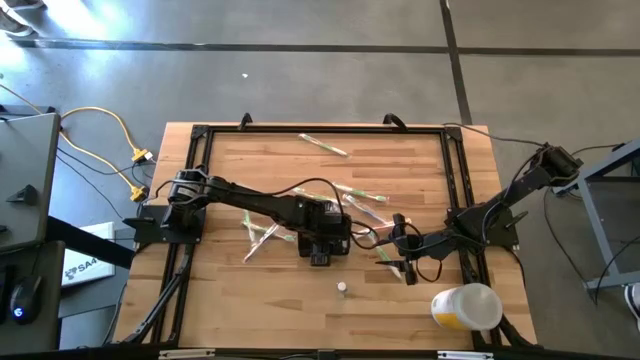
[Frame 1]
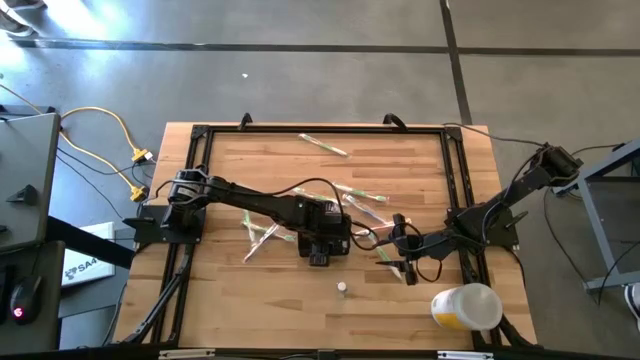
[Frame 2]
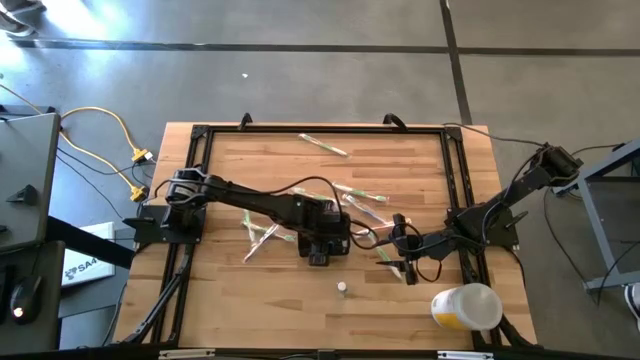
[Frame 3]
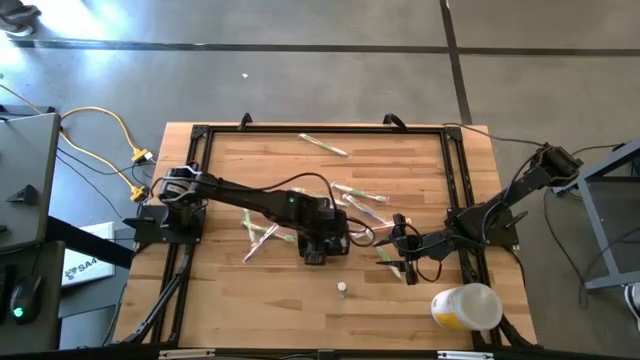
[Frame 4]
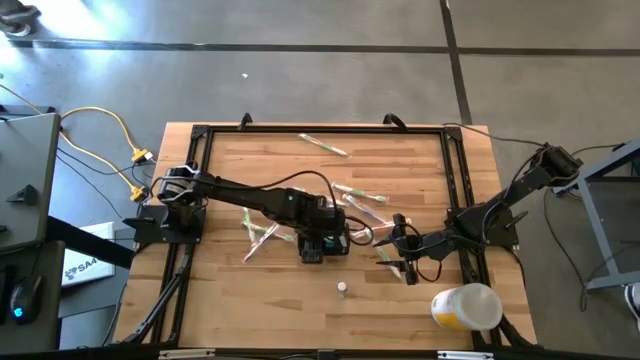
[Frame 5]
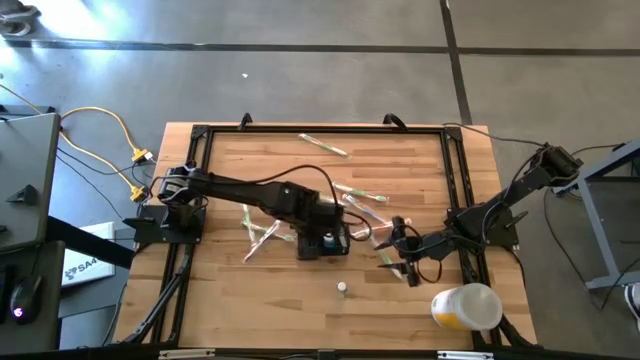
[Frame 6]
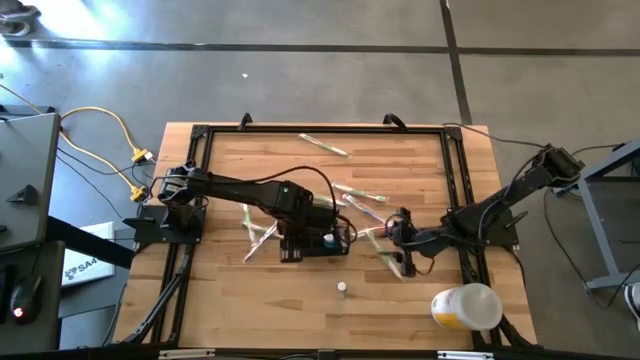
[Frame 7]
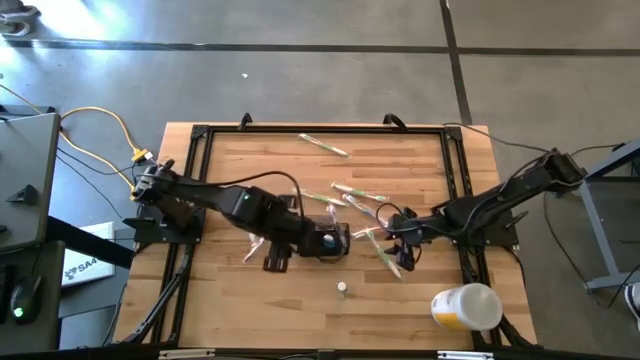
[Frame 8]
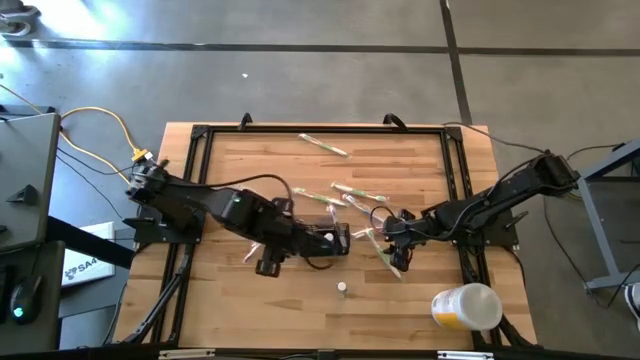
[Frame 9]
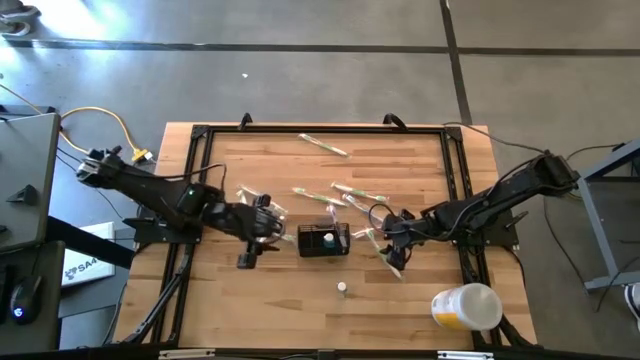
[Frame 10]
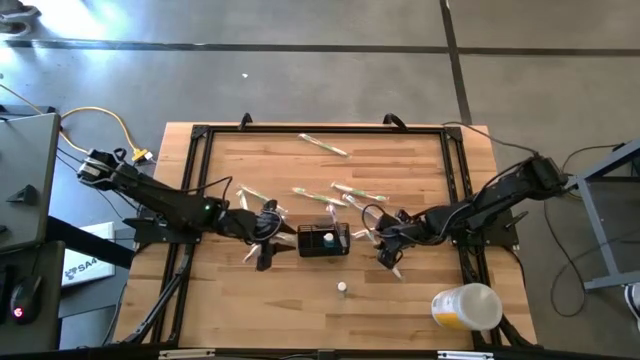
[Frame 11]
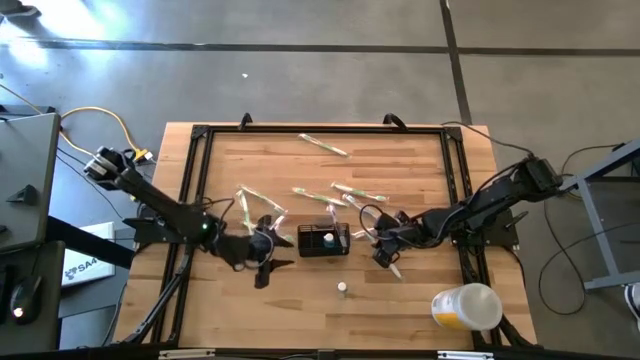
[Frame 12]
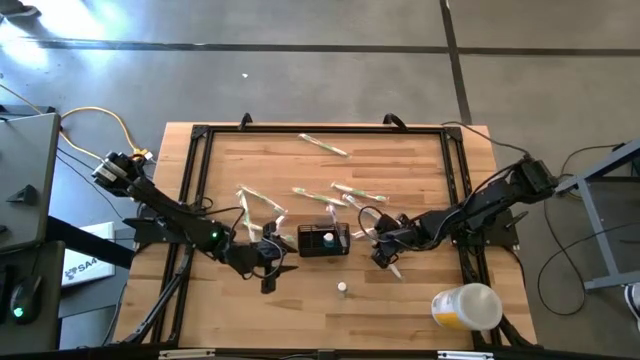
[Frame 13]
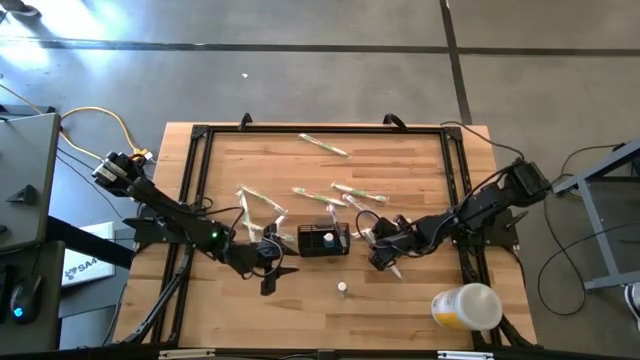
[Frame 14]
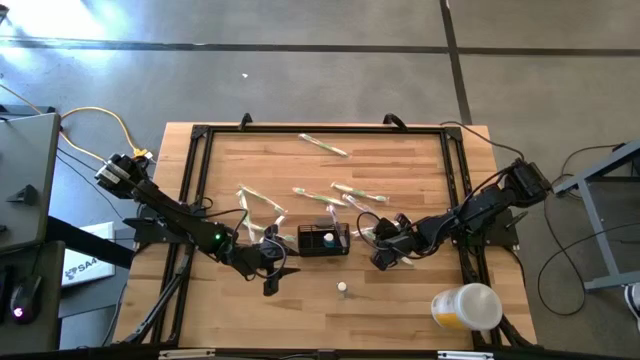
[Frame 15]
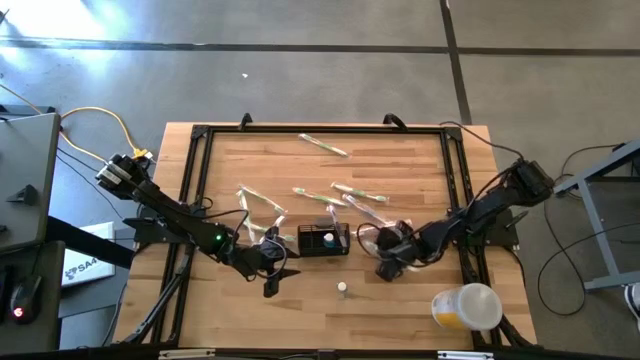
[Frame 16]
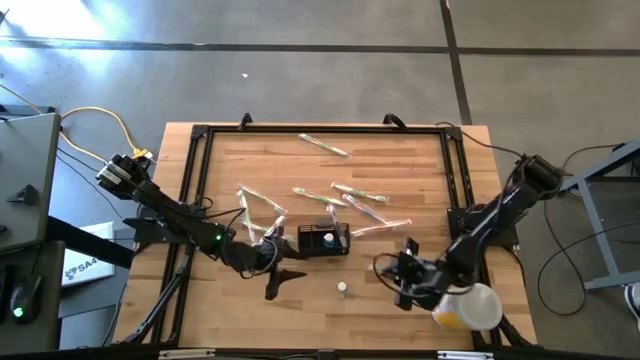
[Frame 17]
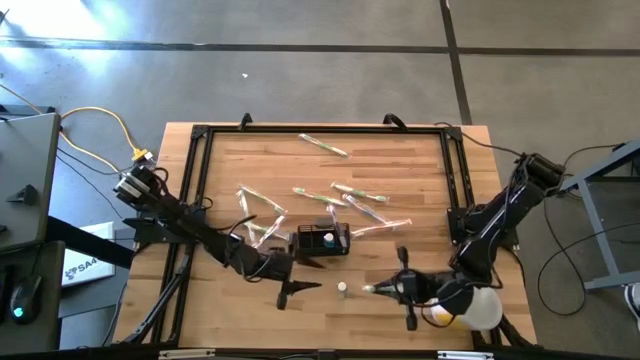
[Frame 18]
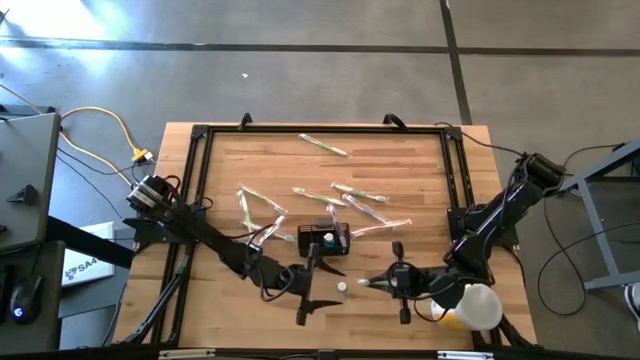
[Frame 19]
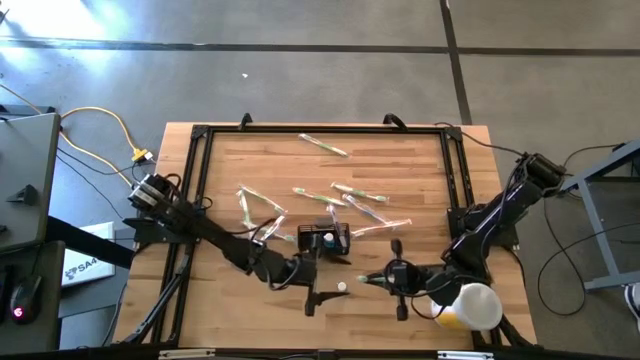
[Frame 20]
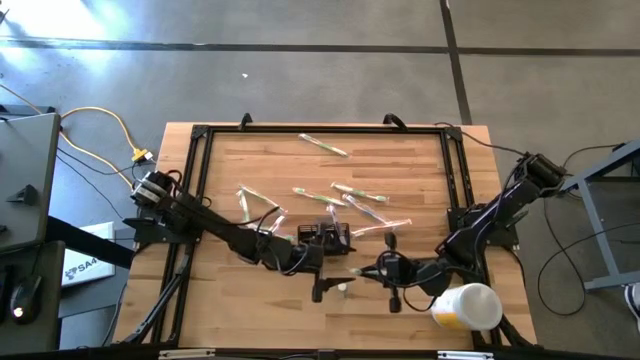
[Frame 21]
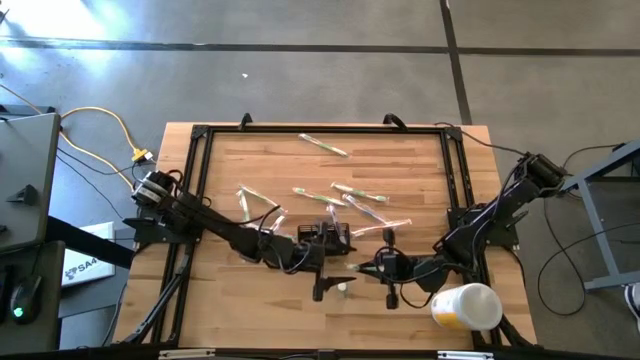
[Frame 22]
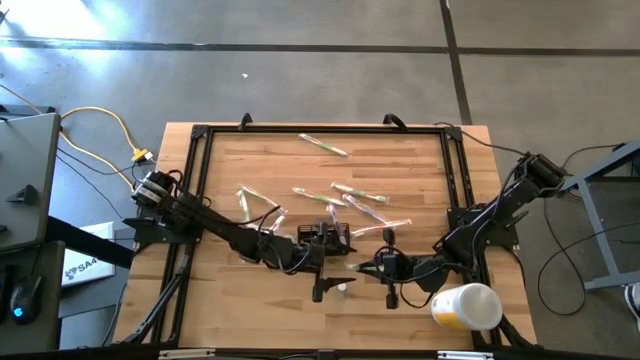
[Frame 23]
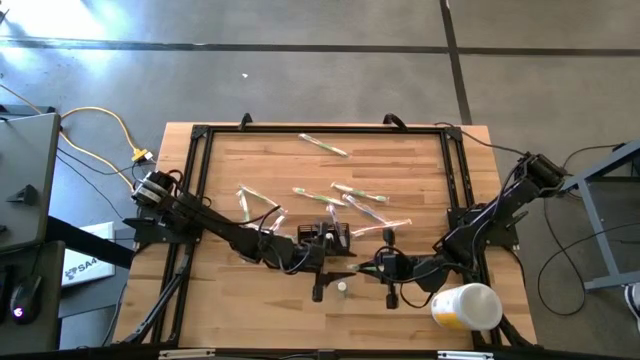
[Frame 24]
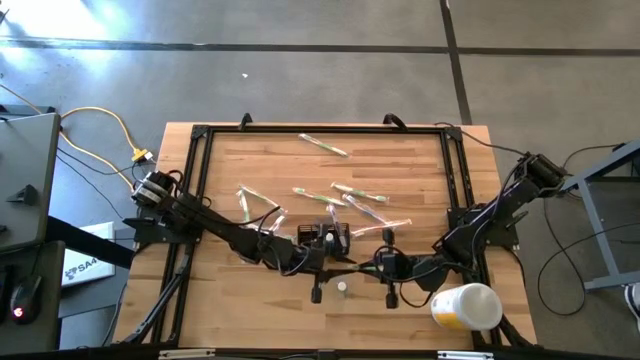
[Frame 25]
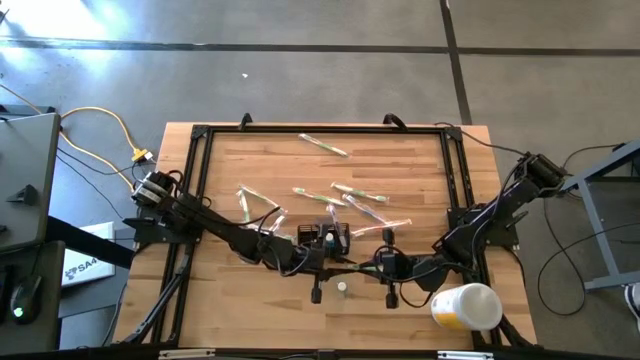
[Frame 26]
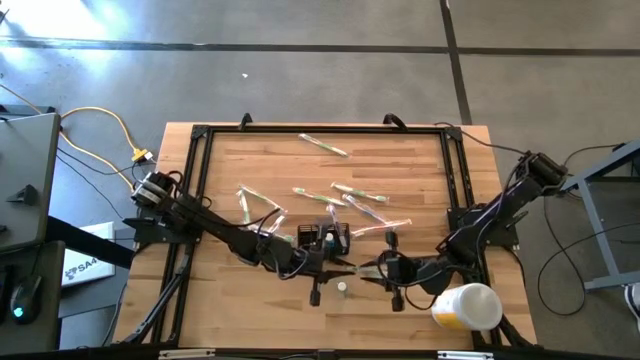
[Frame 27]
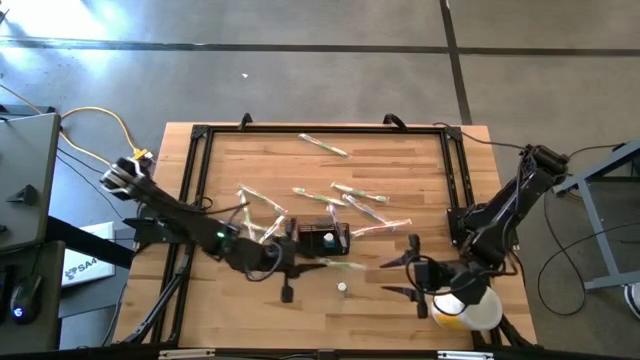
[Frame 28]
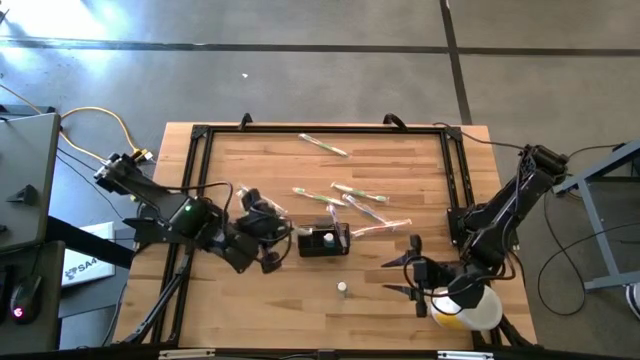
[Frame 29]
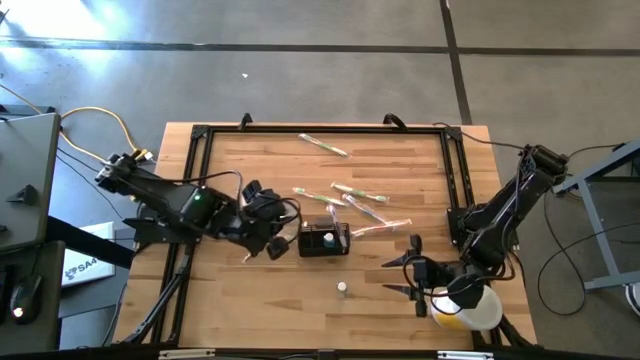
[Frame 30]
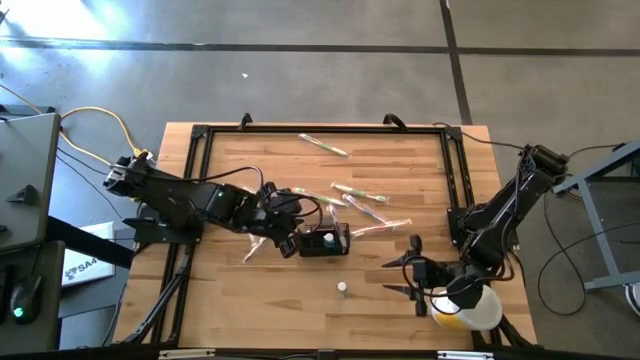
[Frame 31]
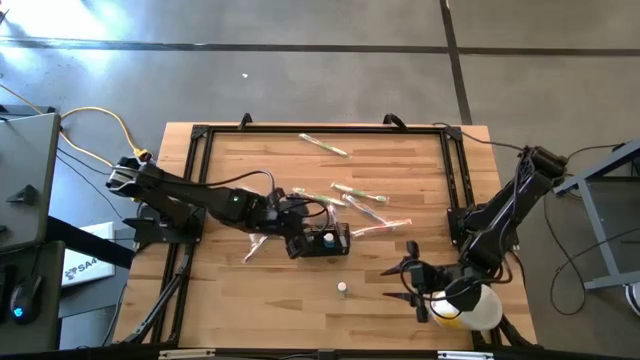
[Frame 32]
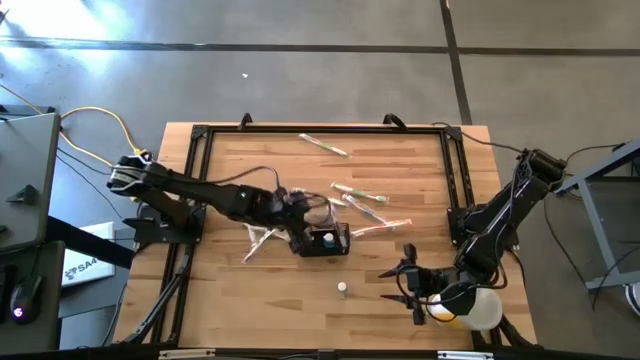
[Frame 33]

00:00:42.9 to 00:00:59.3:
Task: Pick & Place toothbrushing station
Put the green toothbrush into the wire organizer

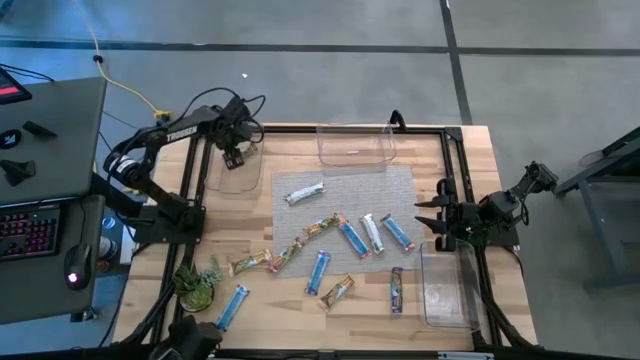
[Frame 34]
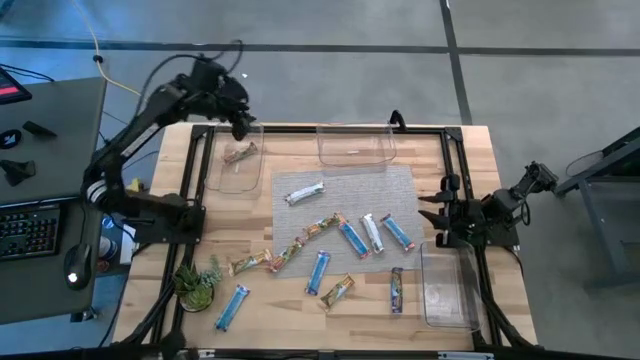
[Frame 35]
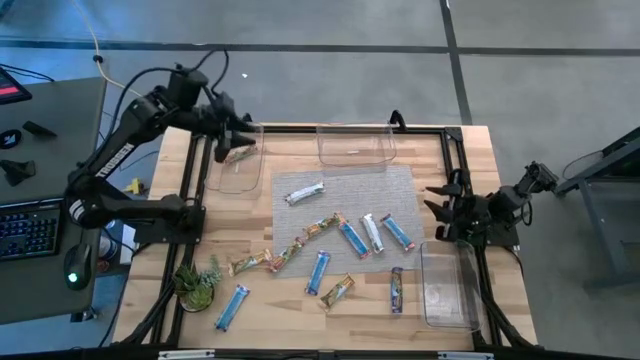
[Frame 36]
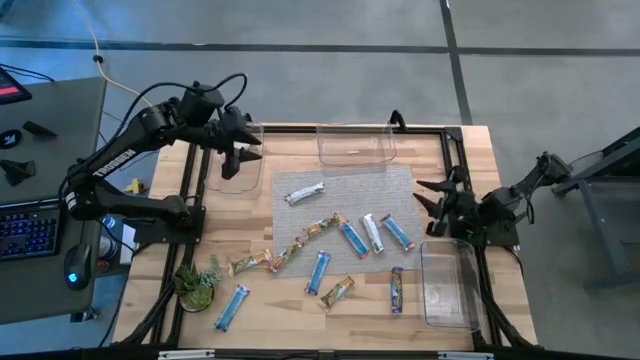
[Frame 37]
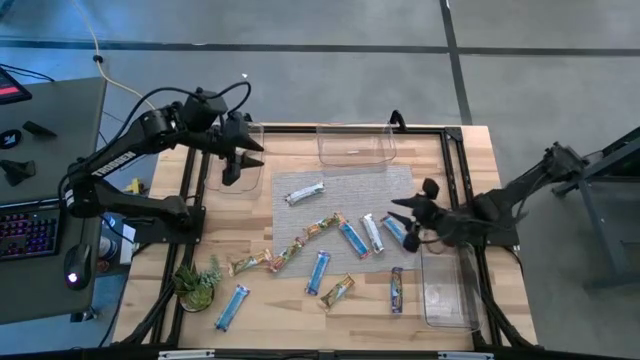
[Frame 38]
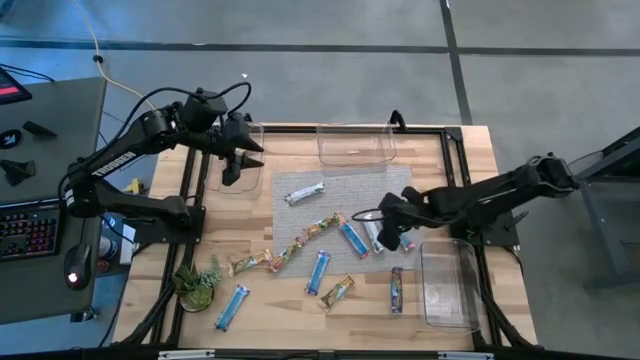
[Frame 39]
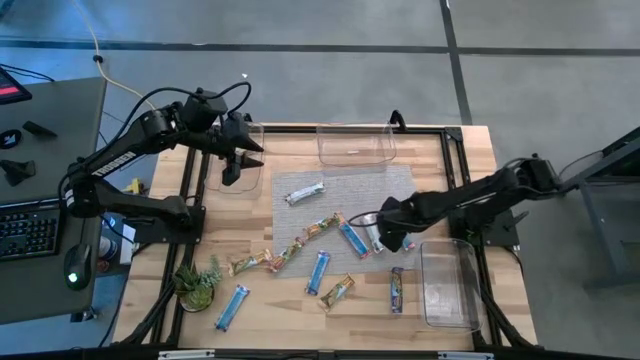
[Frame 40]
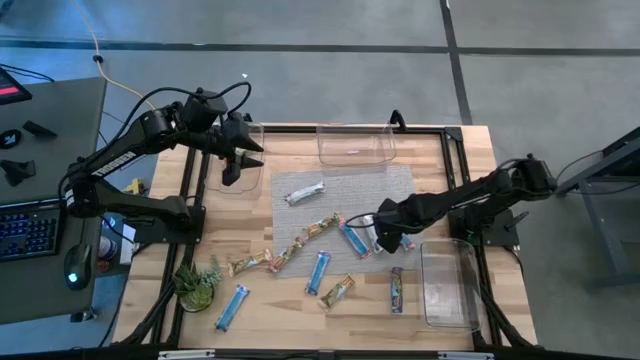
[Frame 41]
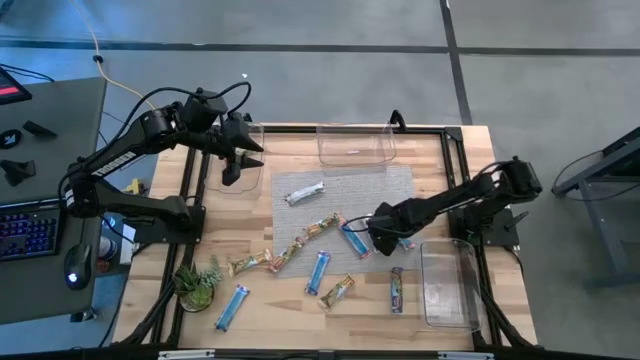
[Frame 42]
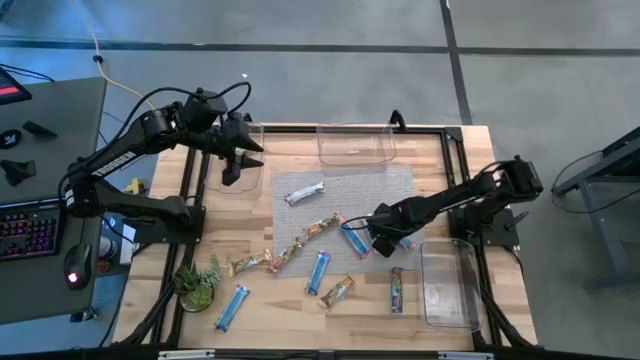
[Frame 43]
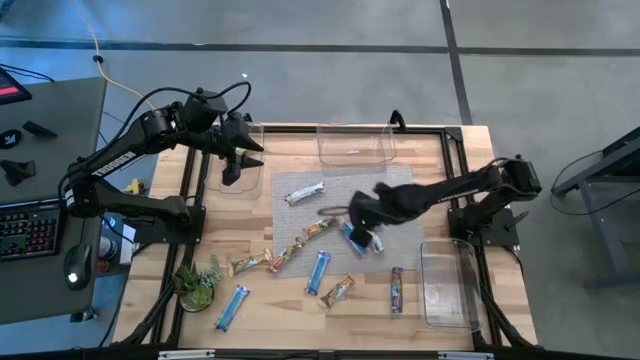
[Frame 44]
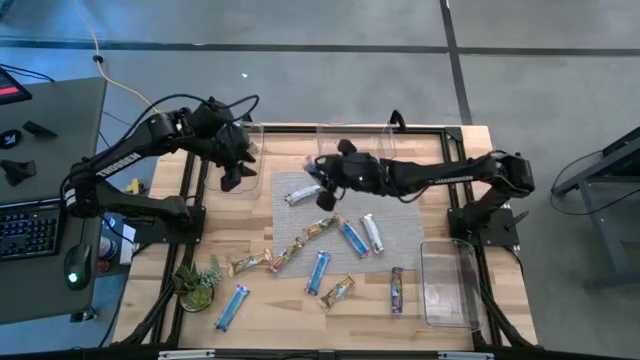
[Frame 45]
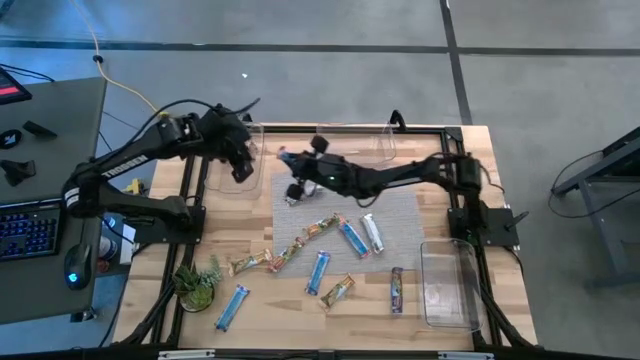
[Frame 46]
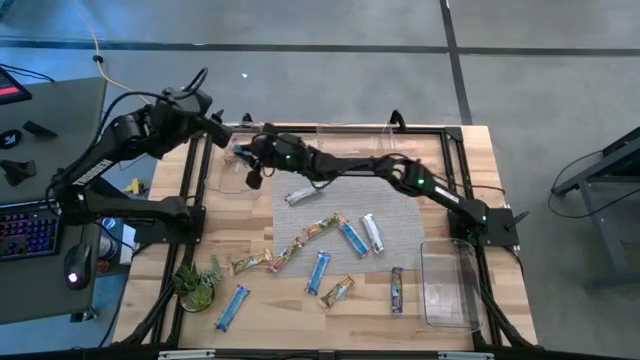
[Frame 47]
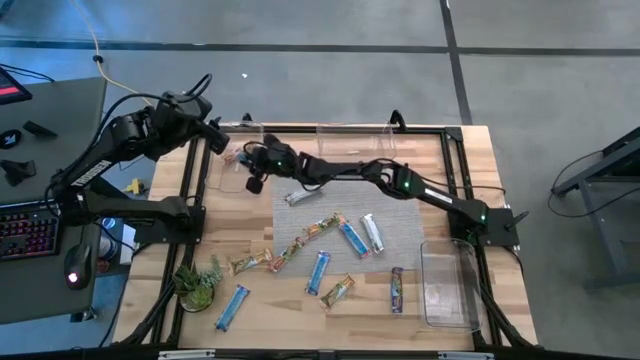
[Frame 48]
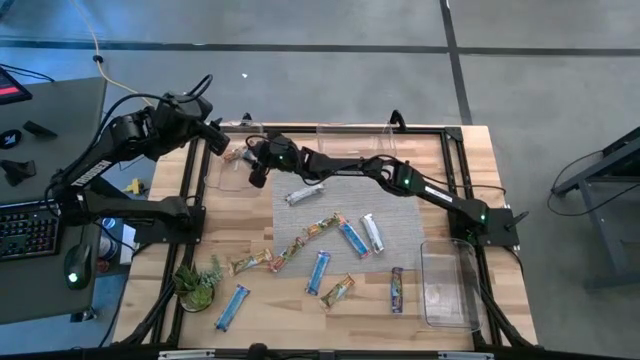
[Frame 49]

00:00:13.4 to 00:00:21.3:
Task: Pick and place Granola Bars by type
Put the red granola bar into the top left transparent bin
